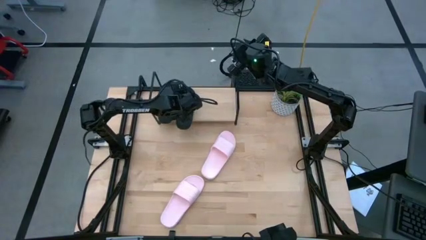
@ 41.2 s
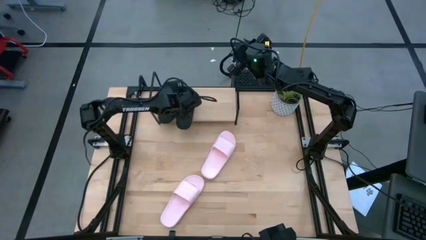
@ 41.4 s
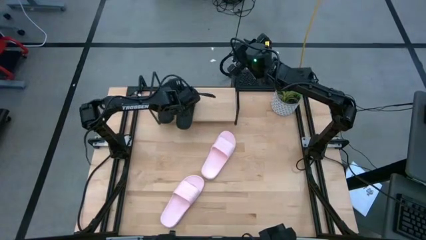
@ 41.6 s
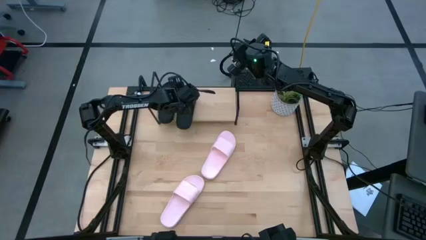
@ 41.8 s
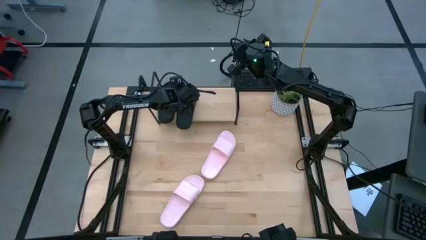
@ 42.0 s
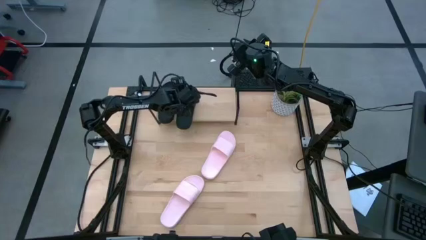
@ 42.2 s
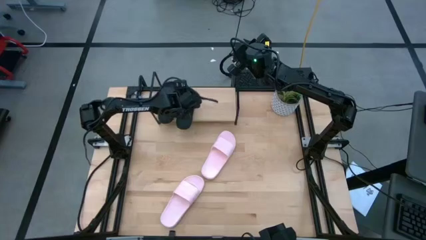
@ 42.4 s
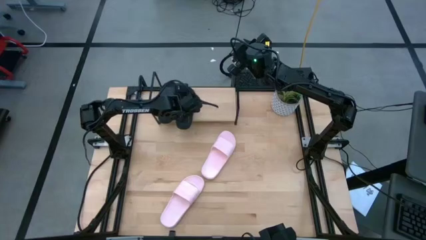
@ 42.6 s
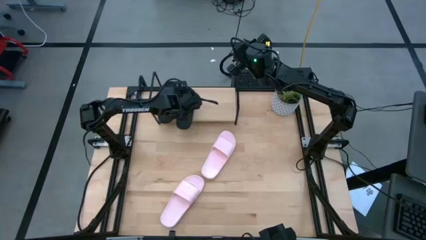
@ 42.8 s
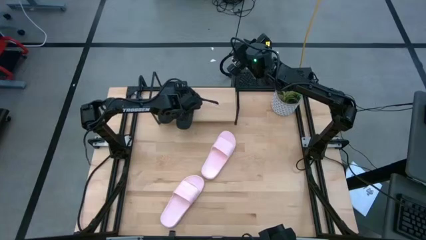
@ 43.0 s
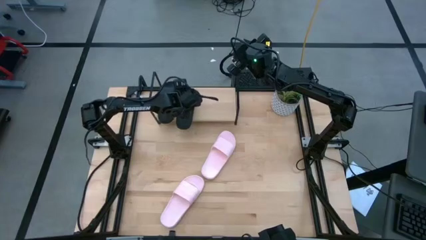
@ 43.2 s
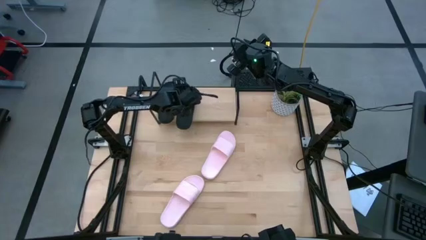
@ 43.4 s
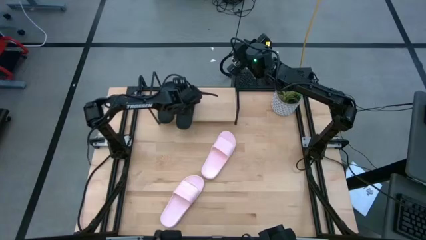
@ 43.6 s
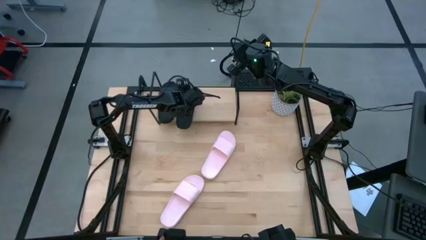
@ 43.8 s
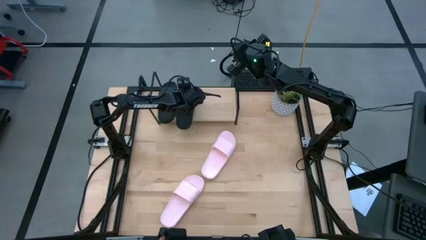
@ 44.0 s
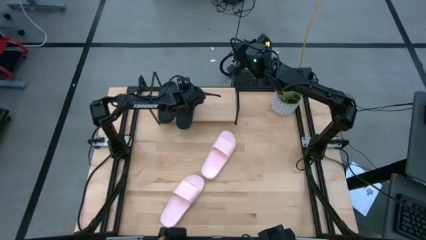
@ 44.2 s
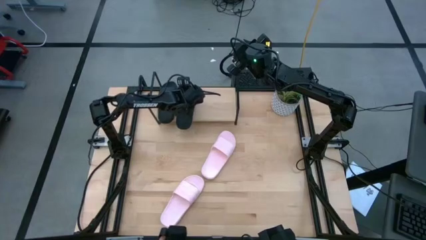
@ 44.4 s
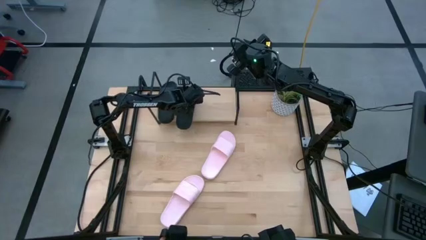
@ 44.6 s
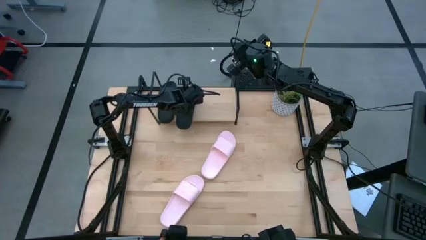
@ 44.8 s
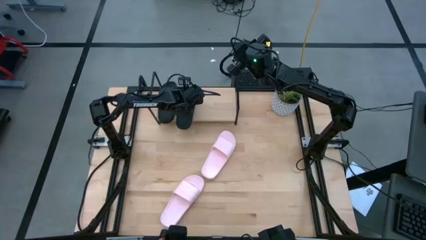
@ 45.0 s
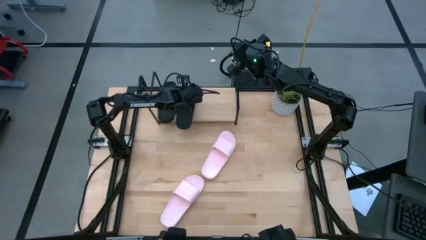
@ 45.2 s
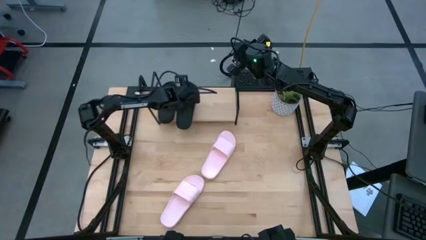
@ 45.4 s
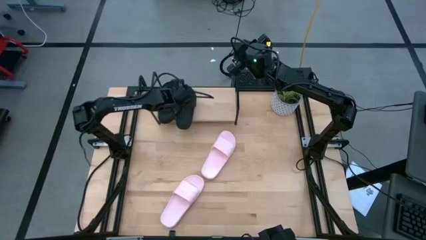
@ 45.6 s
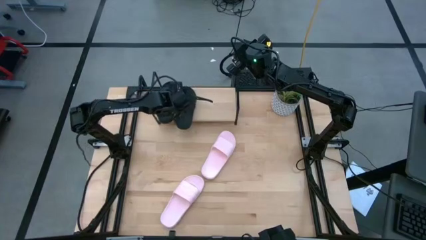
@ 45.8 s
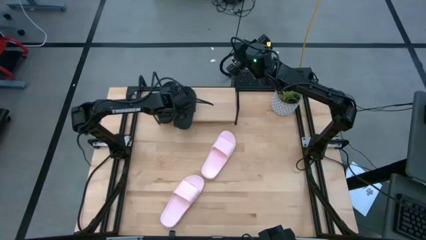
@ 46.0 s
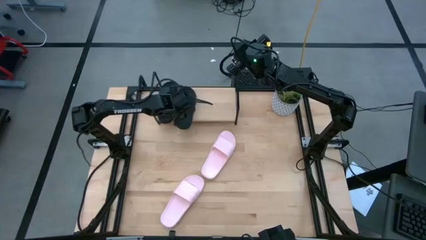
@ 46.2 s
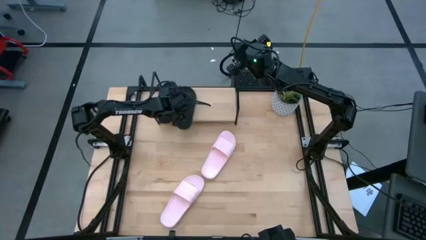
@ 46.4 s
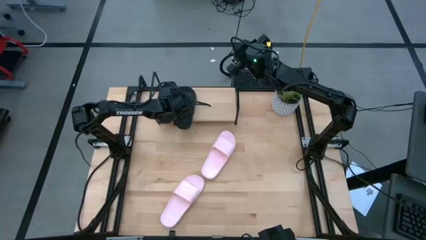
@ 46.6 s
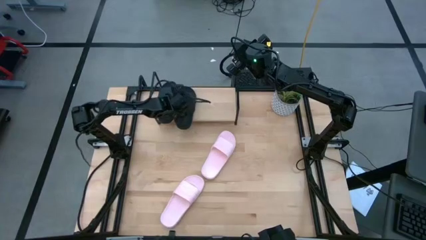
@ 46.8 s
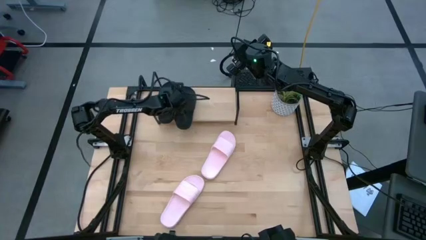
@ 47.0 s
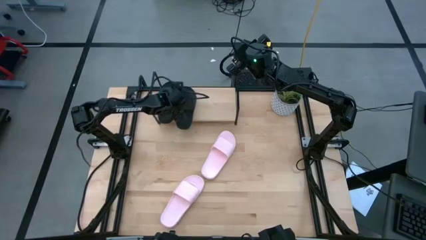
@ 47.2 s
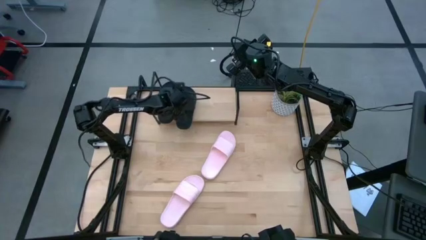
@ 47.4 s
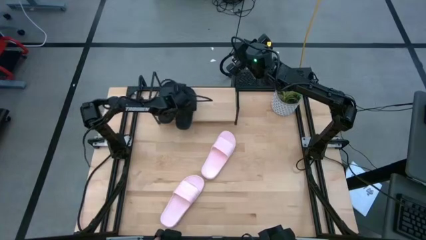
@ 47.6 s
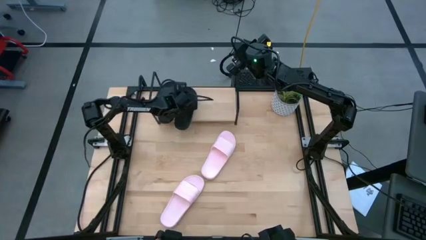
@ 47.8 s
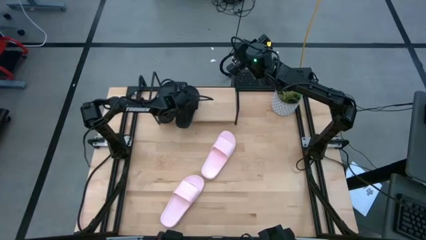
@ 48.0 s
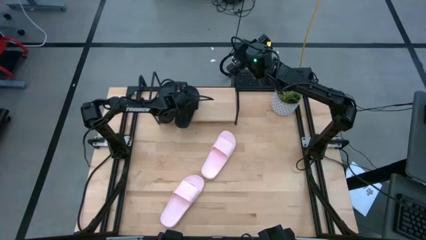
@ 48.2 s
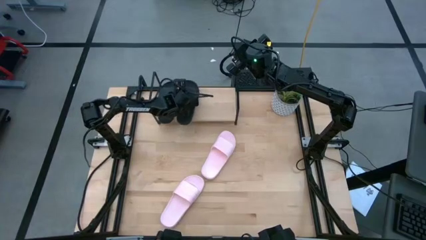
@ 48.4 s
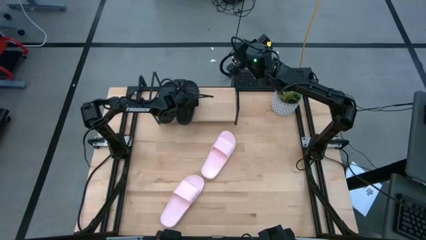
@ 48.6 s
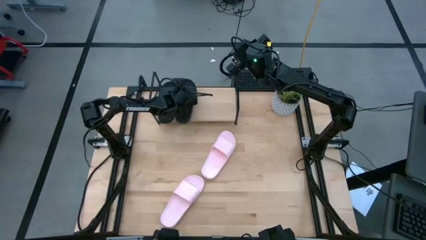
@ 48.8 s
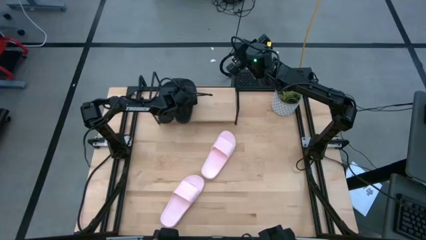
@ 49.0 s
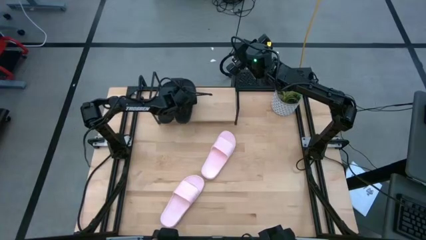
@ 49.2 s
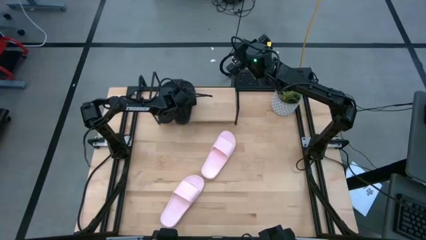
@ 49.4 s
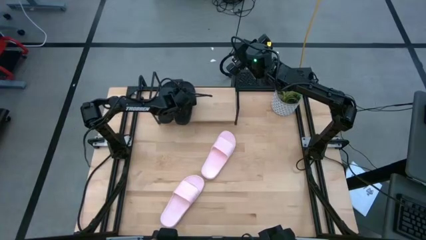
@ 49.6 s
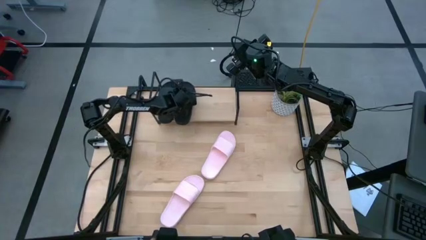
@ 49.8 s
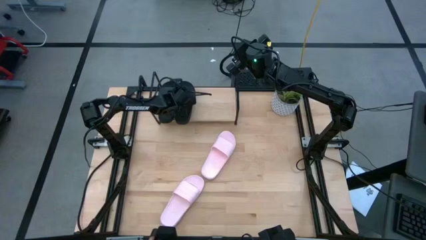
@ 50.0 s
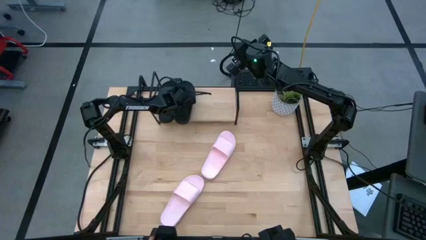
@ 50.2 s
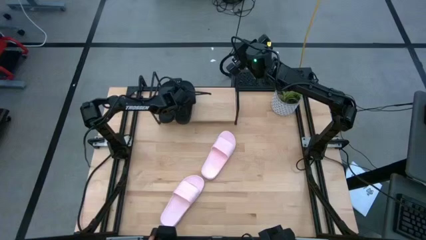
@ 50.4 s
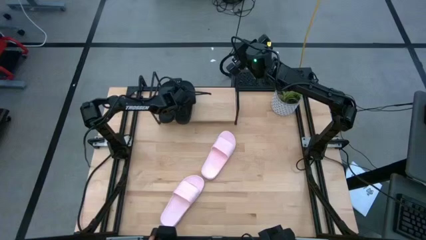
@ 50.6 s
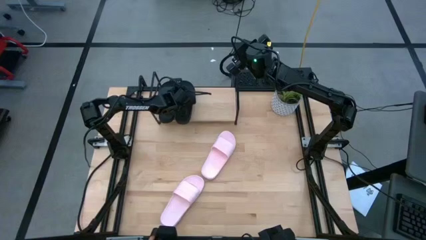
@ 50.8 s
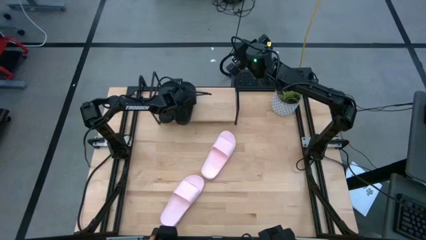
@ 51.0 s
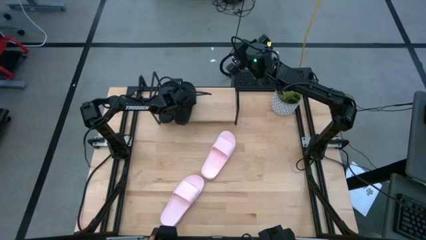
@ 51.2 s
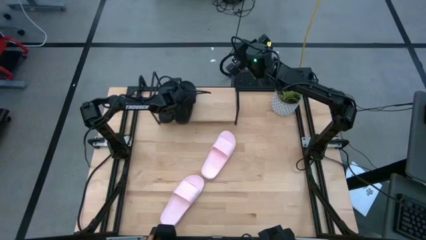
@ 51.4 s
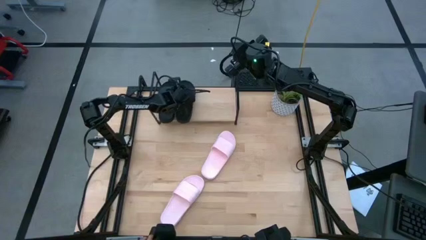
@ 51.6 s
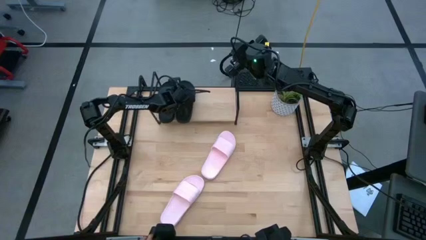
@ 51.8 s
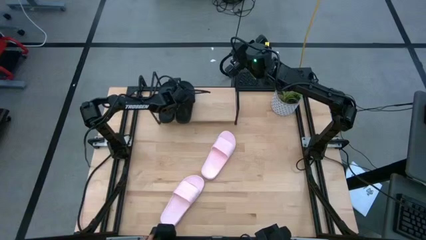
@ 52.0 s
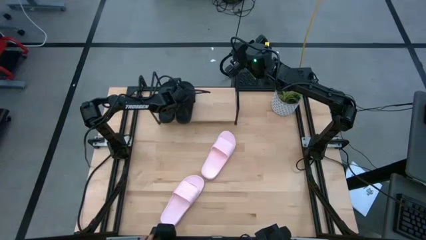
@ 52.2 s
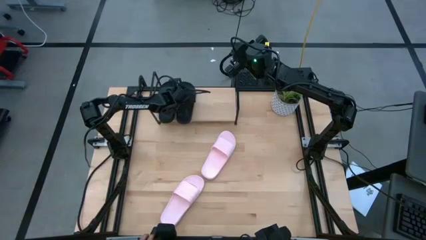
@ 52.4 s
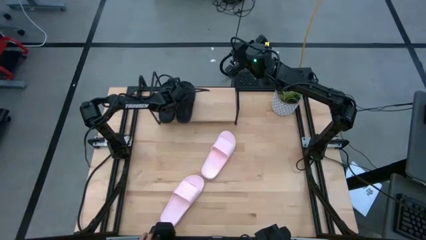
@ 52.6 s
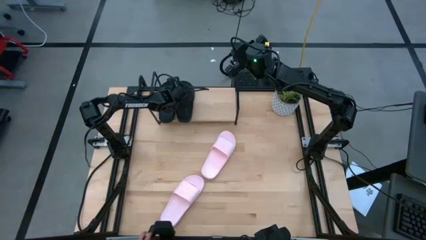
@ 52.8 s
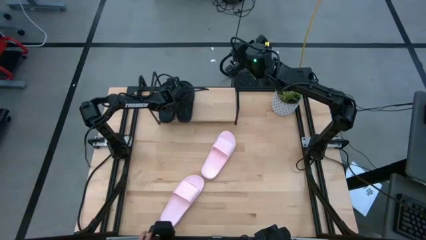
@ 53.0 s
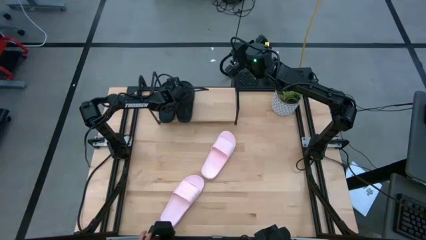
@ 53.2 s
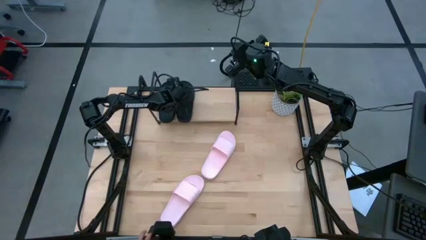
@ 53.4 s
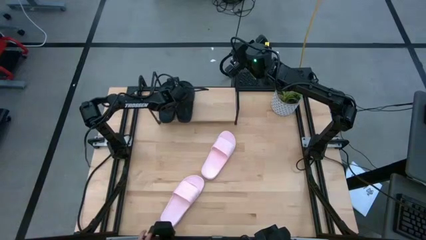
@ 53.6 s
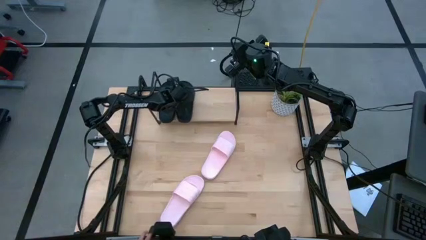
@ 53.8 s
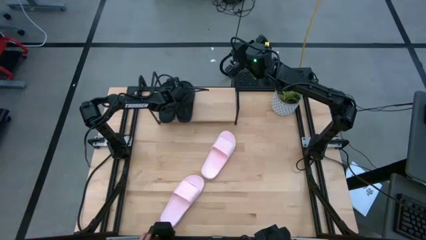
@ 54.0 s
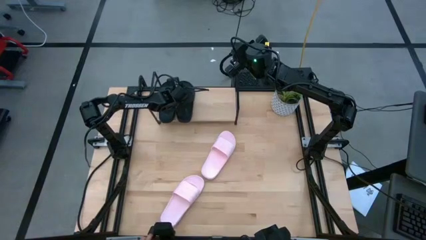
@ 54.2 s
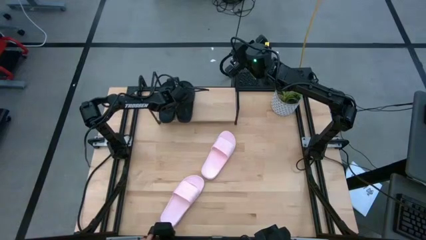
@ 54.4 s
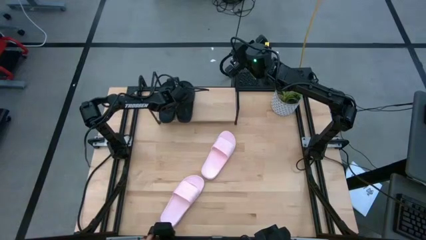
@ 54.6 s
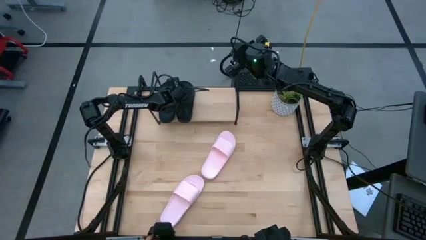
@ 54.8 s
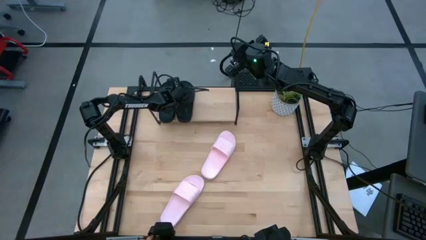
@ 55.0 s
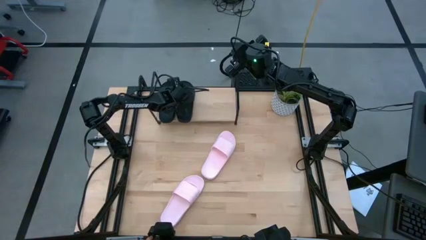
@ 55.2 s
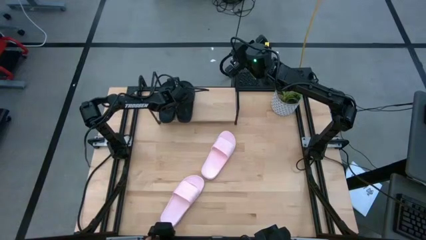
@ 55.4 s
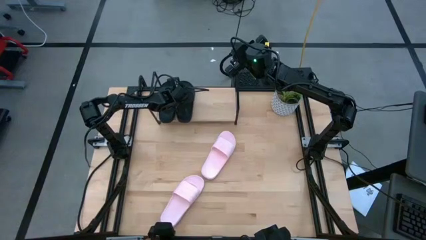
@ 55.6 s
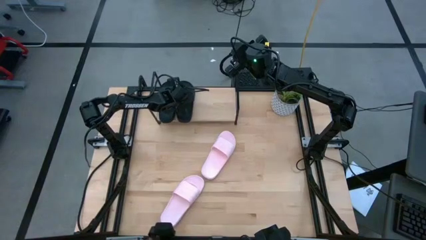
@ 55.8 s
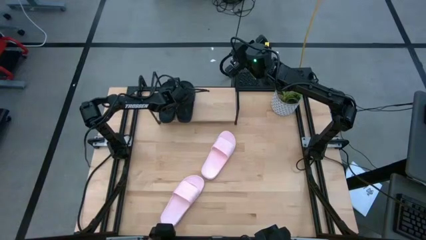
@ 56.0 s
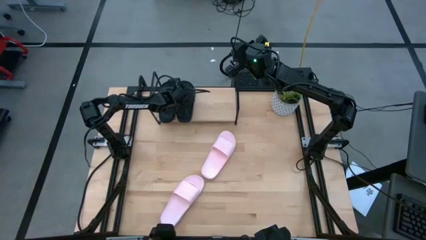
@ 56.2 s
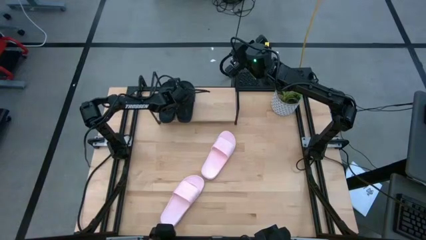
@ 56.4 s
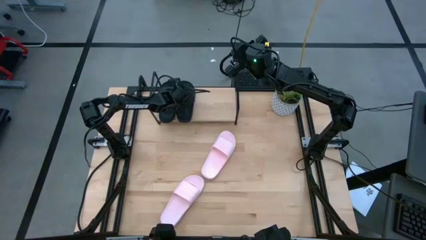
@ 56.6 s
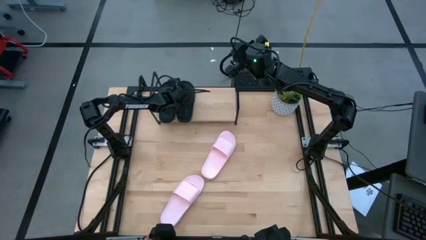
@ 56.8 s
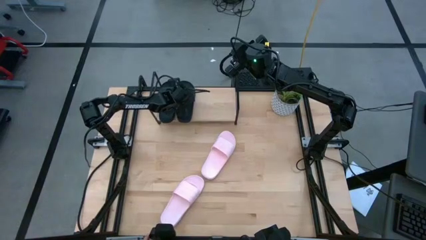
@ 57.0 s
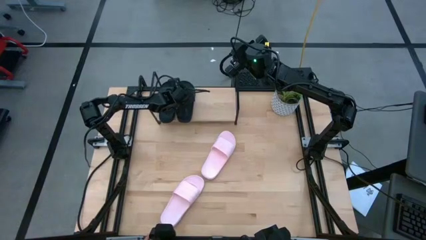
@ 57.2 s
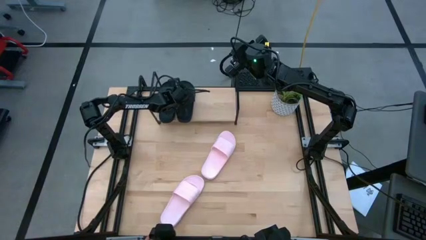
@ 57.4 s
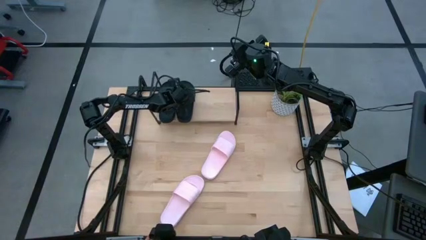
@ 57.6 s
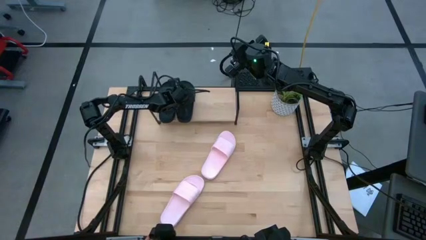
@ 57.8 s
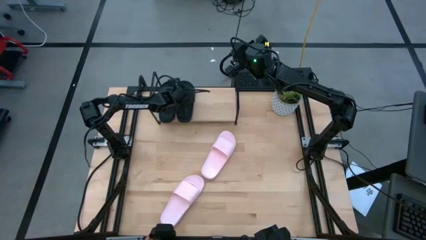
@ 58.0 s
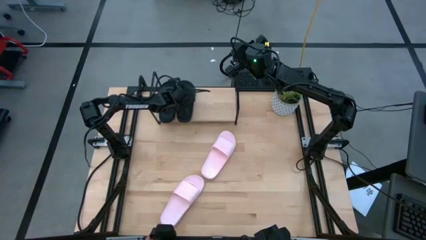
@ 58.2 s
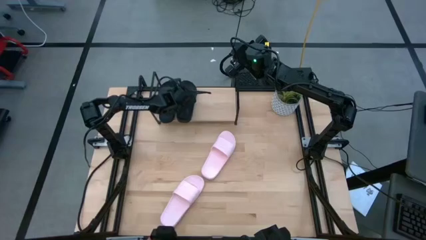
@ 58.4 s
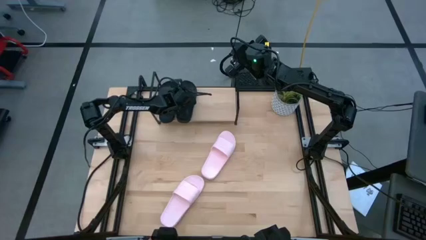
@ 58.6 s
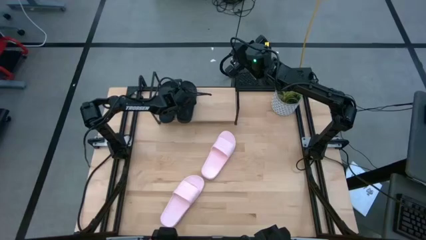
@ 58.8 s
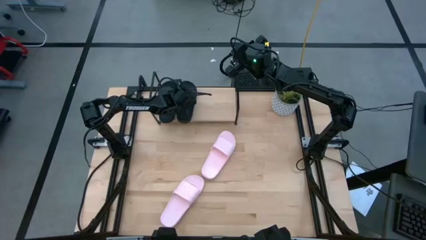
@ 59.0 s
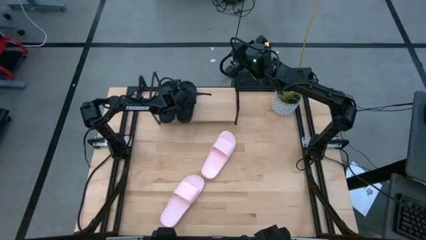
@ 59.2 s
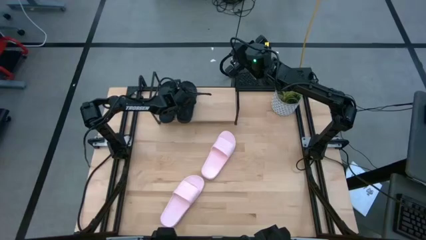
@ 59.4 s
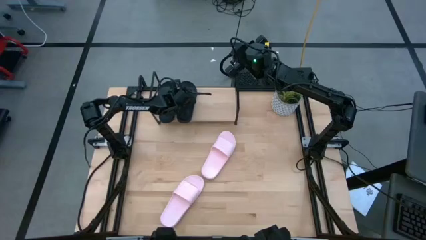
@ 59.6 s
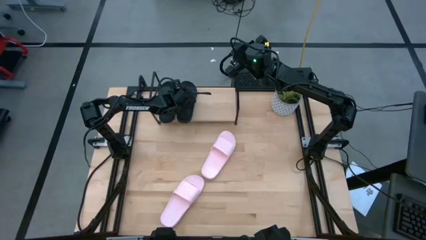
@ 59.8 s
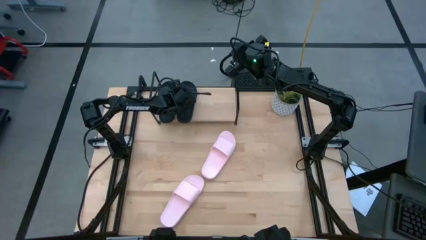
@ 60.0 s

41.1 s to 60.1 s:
Task: Pick and place slides into the shelf
Put the black slipper on the shelf
